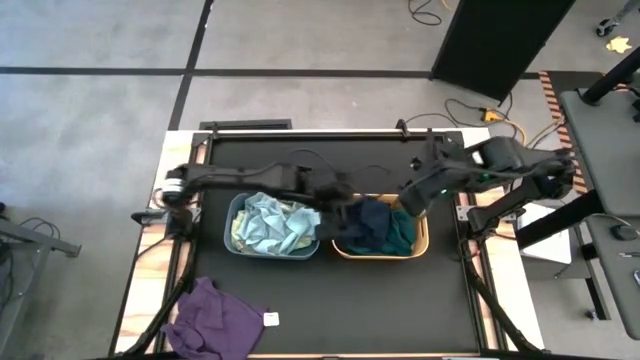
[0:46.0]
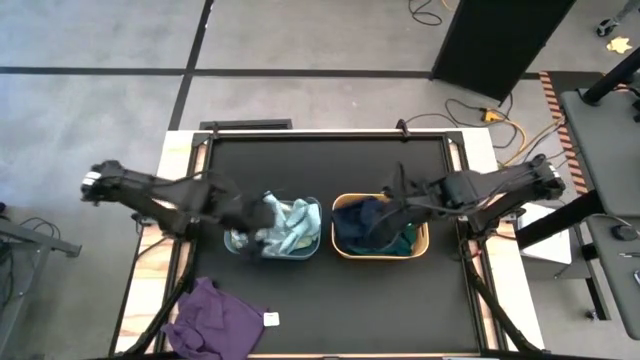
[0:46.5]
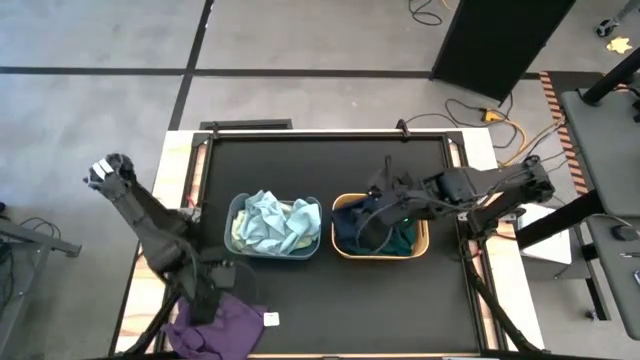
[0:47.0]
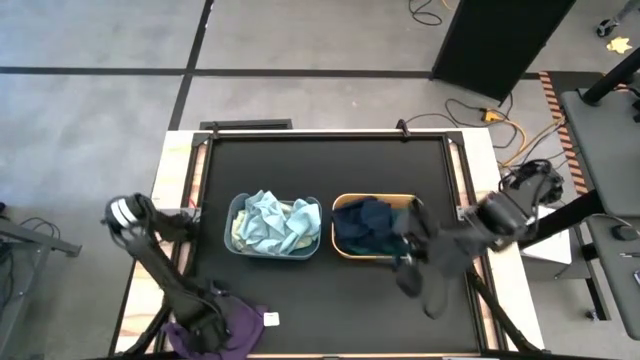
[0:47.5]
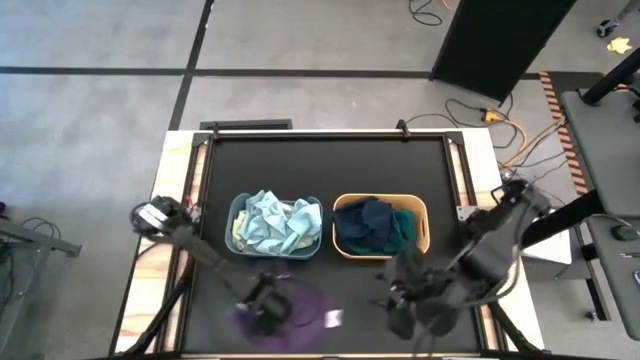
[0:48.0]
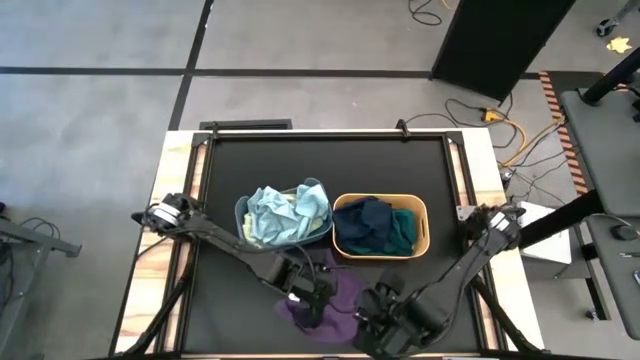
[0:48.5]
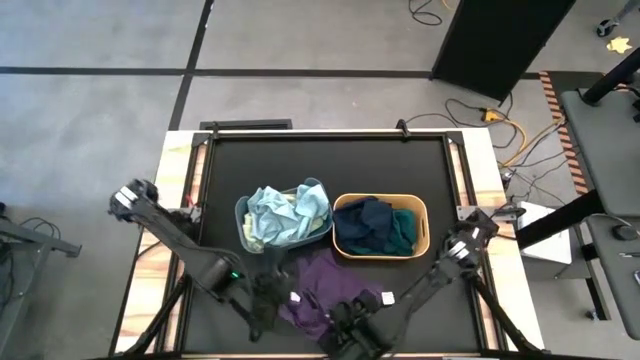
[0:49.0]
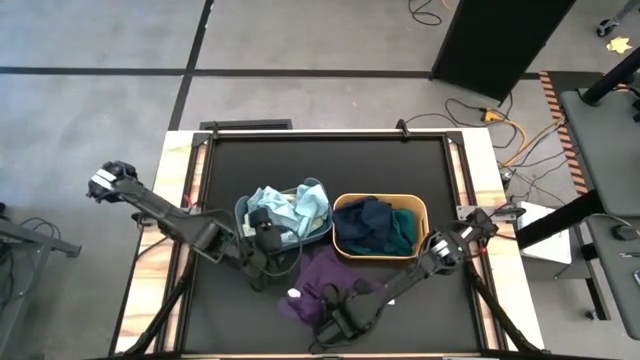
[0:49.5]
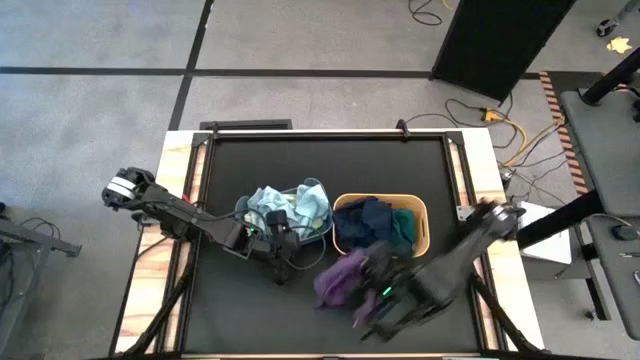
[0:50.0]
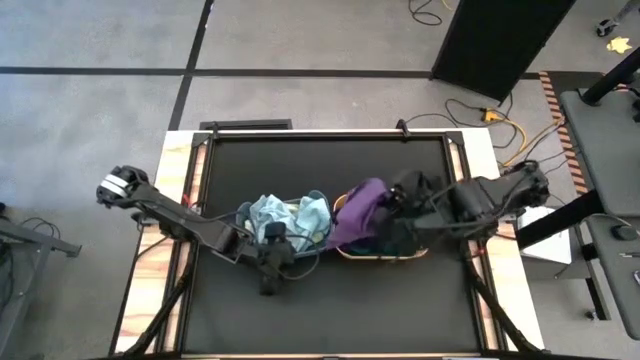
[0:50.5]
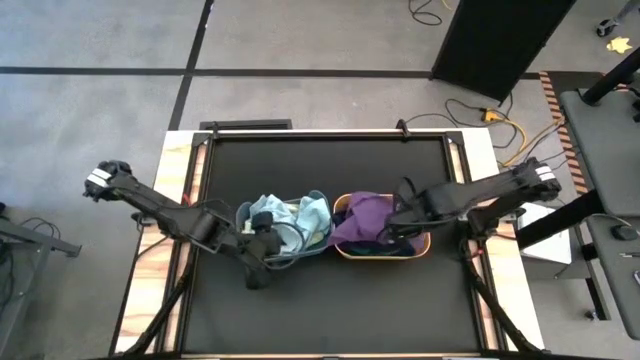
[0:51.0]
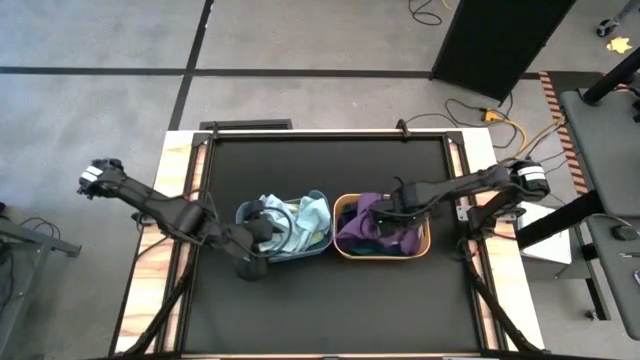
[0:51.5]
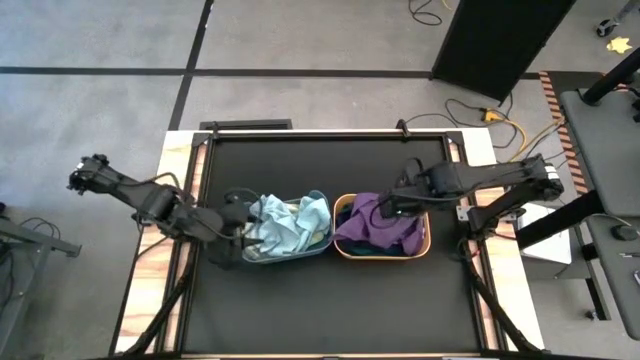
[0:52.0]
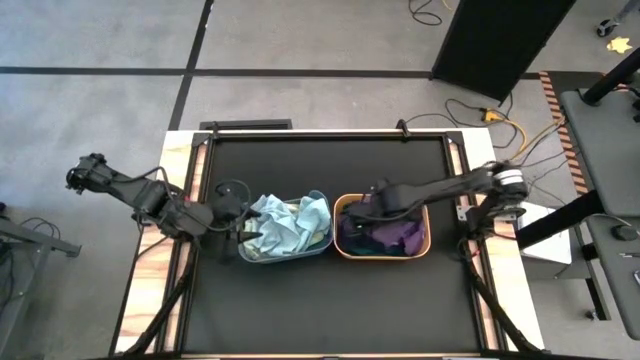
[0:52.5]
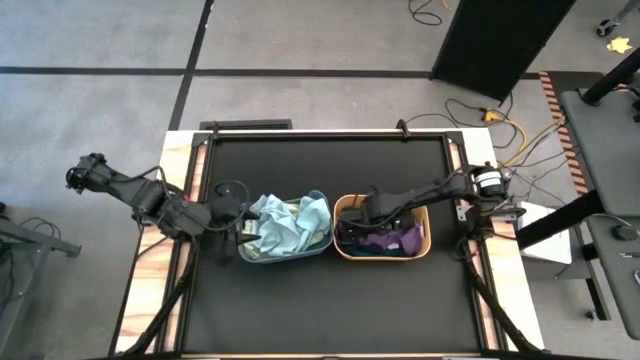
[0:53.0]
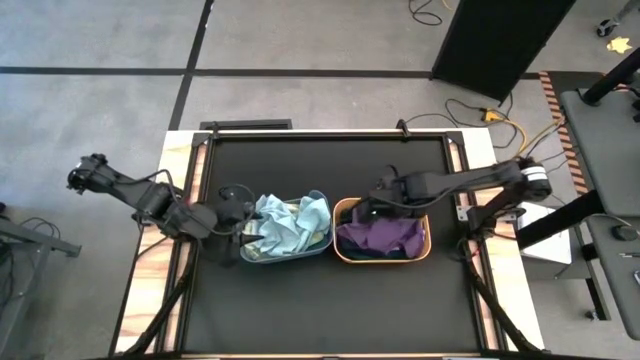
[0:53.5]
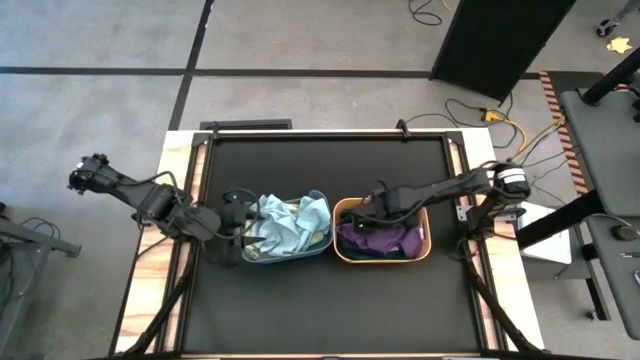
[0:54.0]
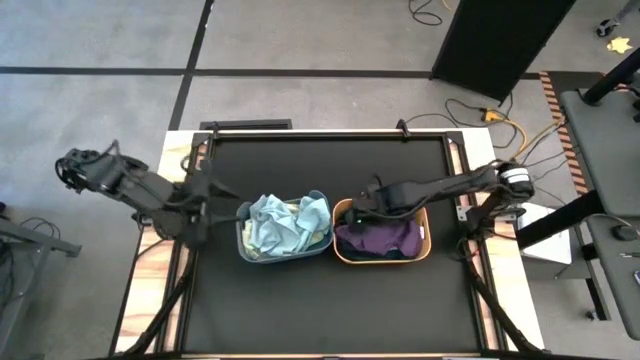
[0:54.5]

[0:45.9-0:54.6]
Task: Sort towels by color in basket
Put the violet towel into the yellow bin

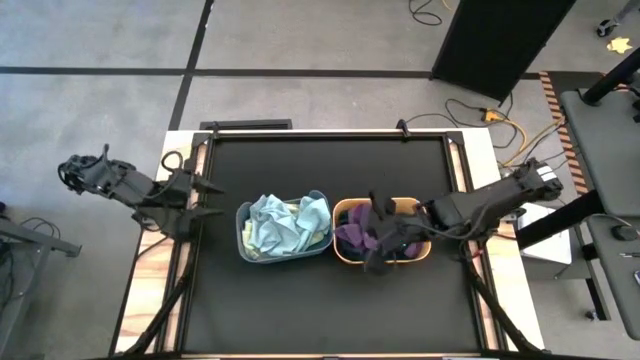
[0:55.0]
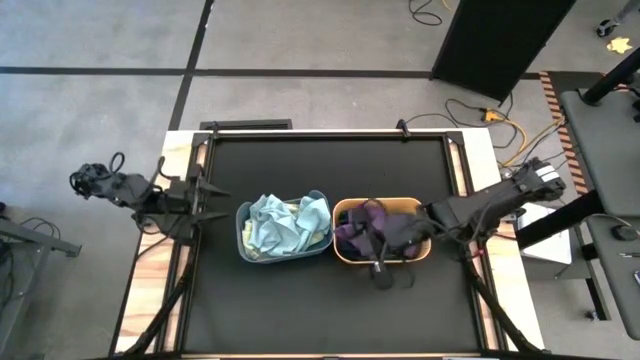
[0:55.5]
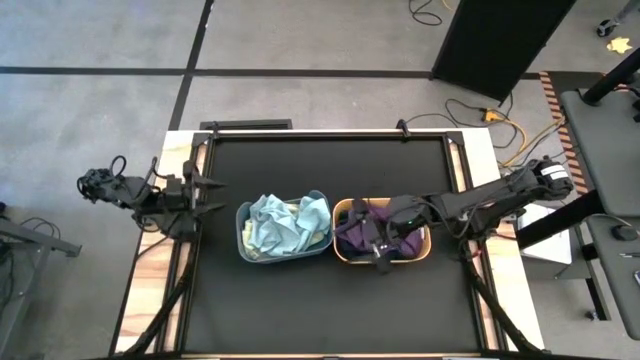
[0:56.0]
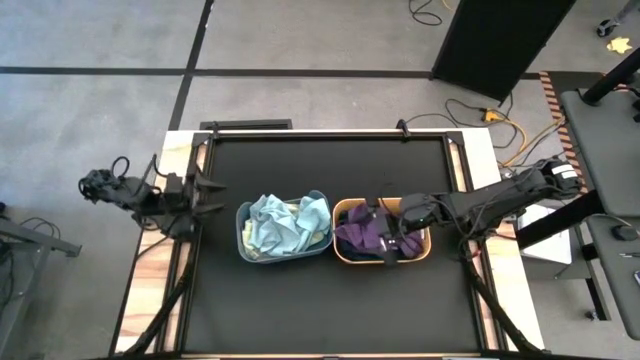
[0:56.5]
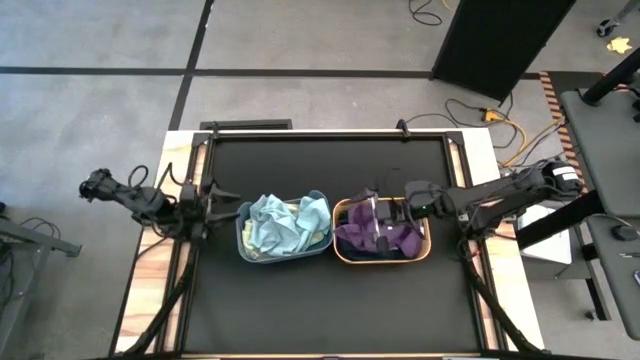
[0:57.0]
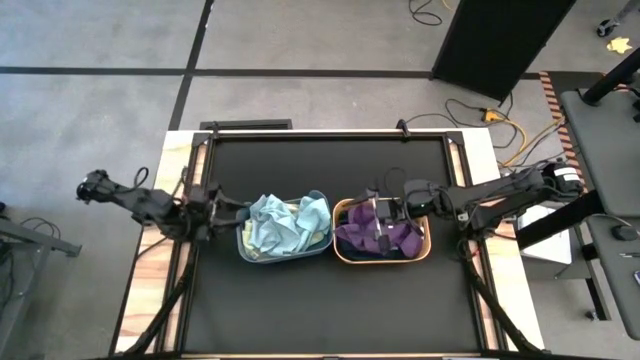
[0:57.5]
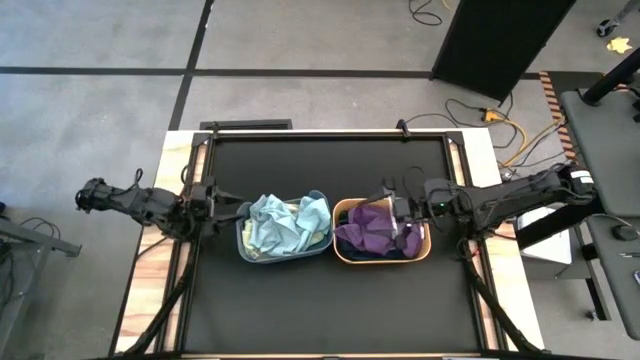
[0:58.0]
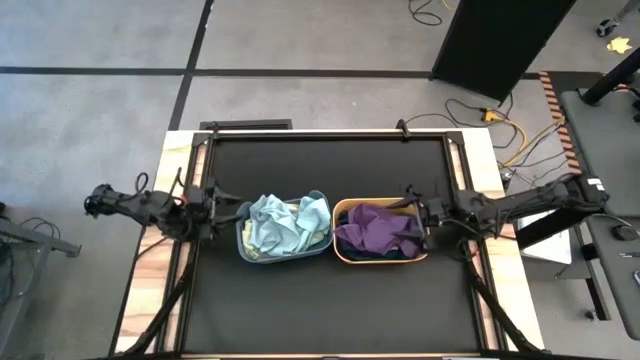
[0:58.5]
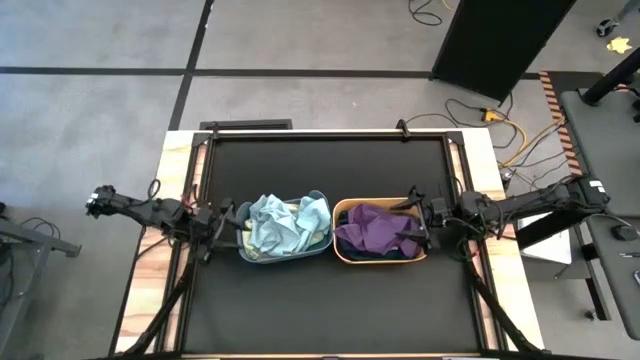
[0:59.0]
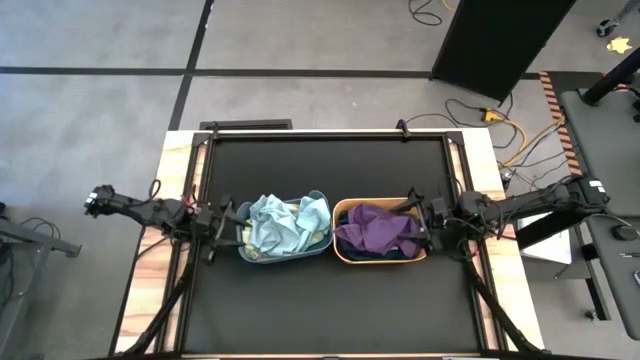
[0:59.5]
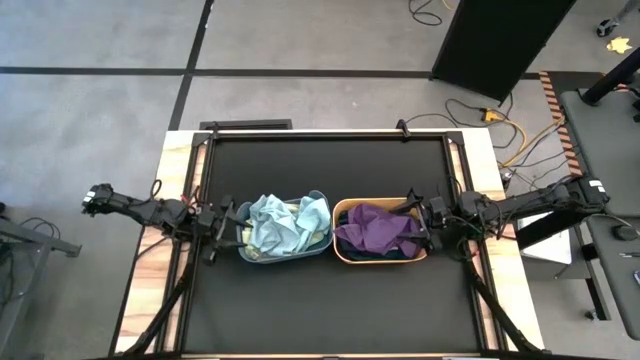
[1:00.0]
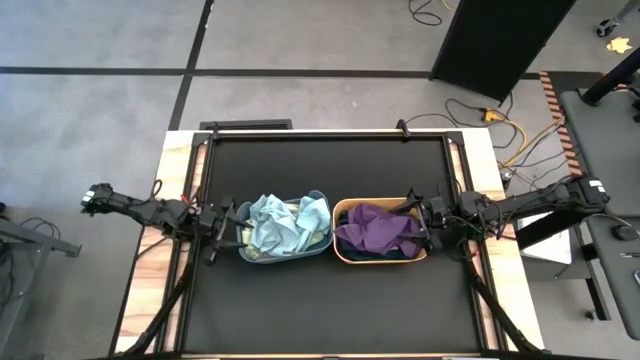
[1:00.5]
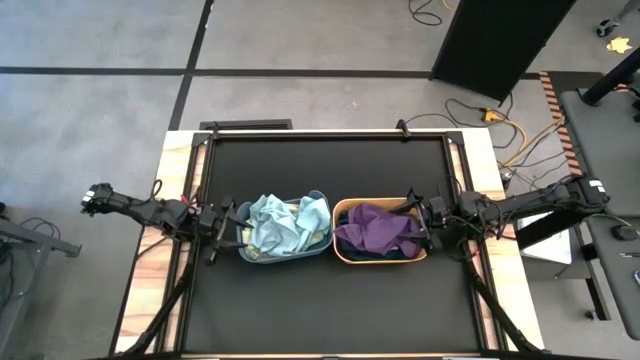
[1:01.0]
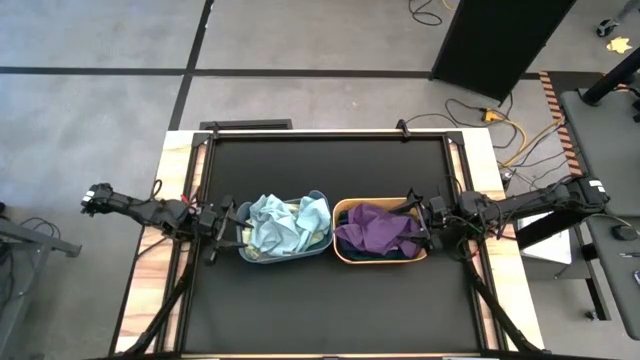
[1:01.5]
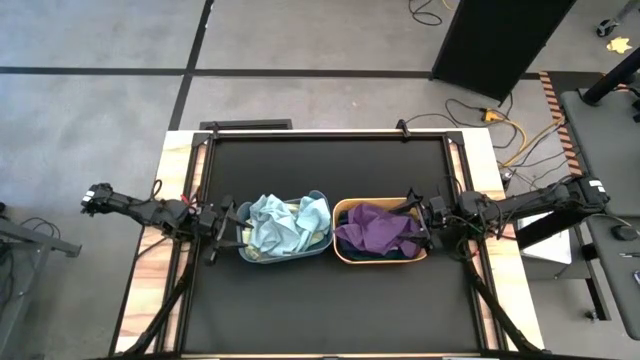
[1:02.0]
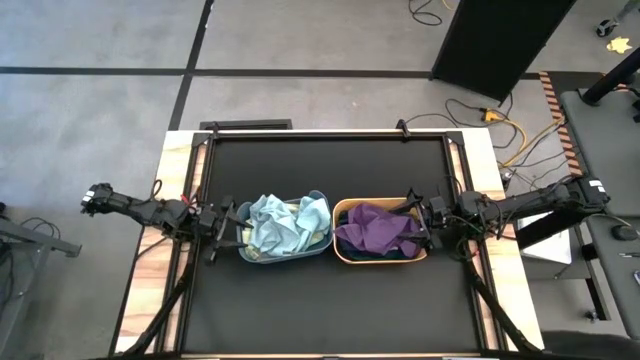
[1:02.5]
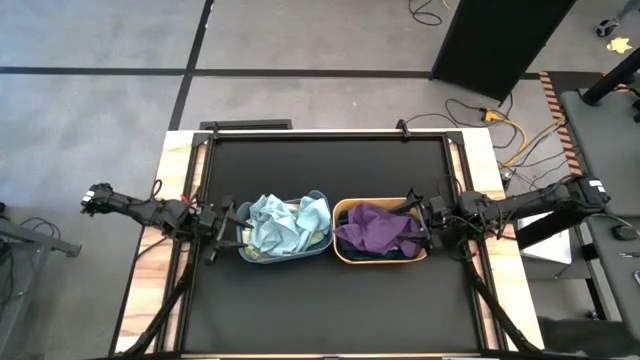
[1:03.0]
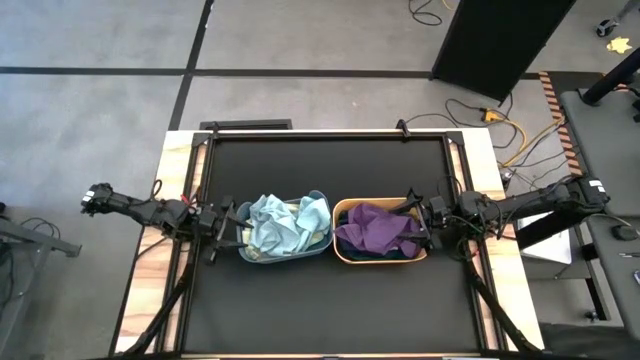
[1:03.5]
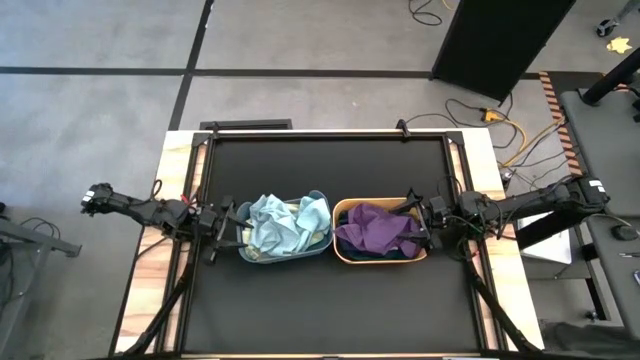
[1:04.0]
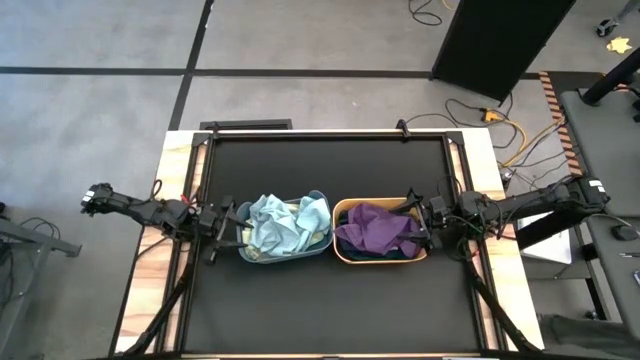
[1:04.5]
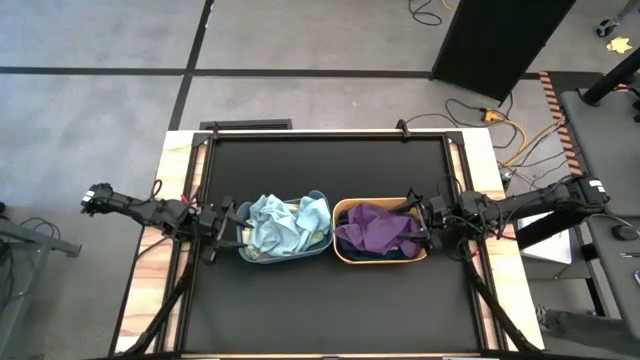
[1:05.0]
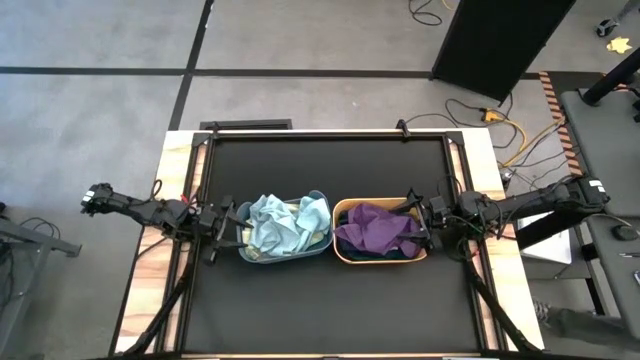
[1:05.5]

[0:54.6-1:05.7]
Return to Home Position

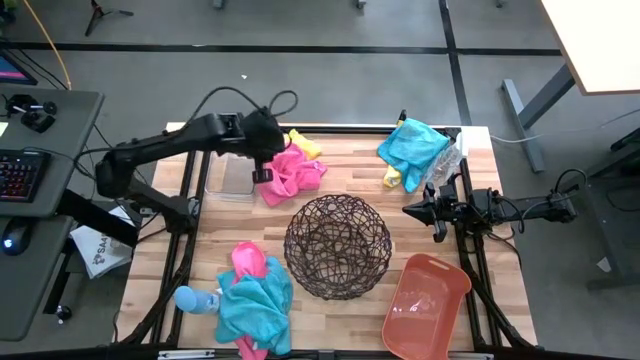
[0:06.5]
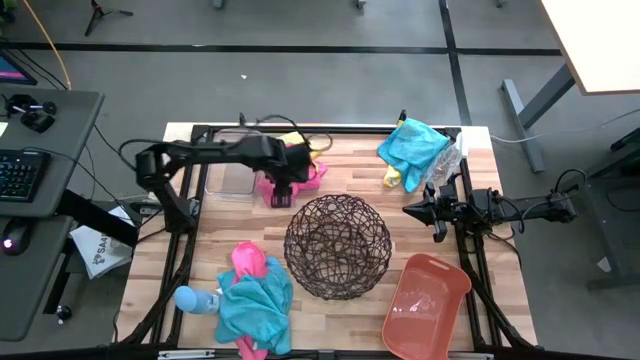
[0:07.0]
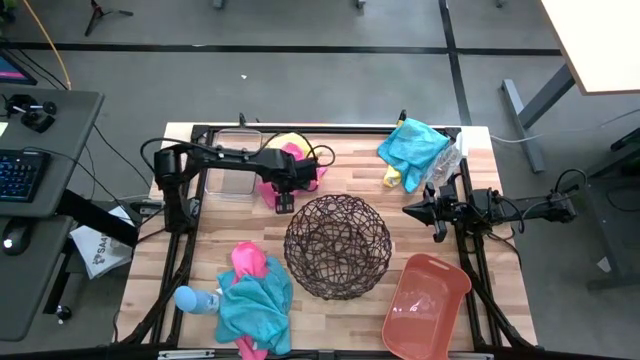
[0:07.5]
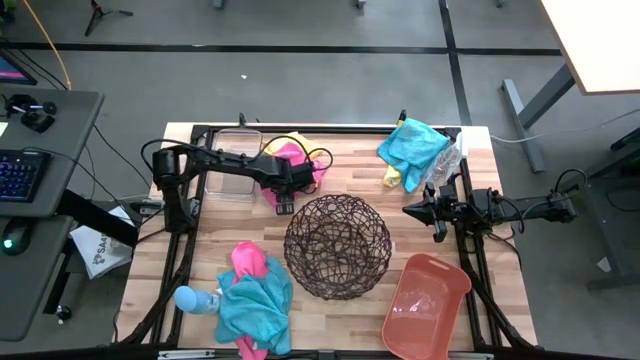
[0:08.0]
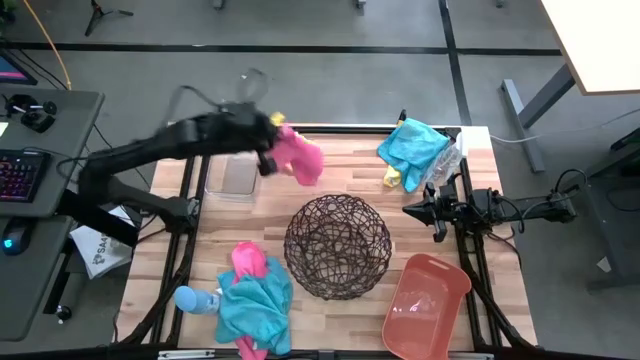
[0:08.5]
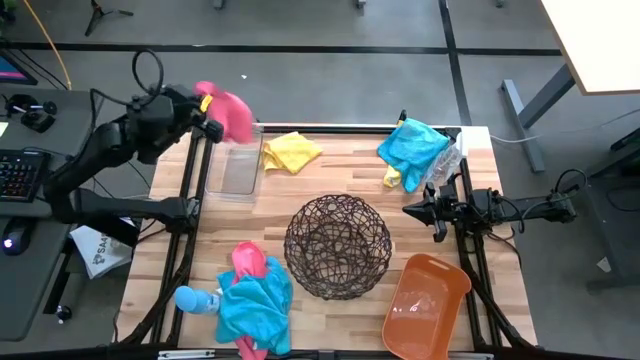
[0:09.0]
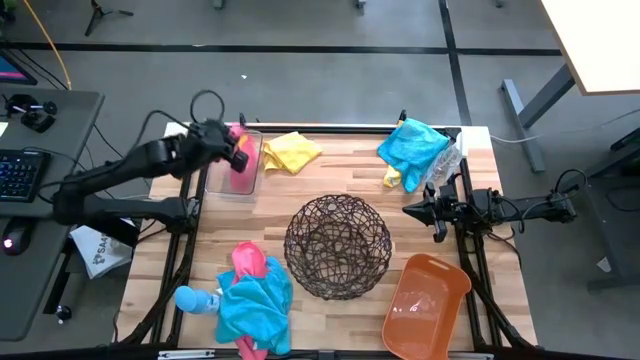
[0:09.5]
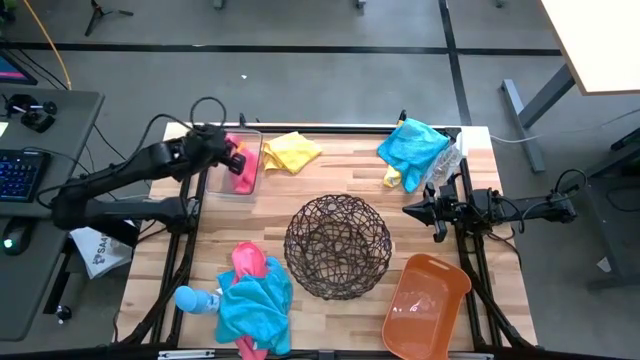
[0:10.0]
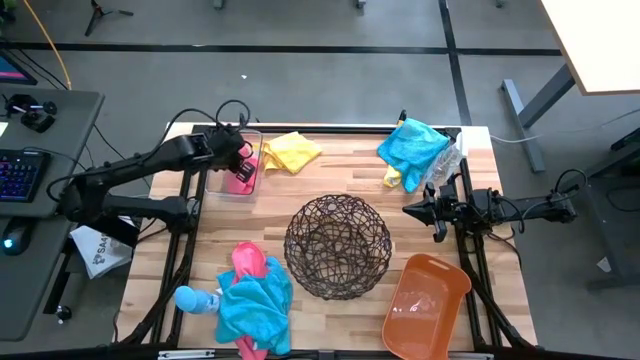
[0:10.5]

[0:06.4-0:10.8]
Task: Sort microfiber towel by color & place in baskets
Put the top pink towel into the transparent bin
